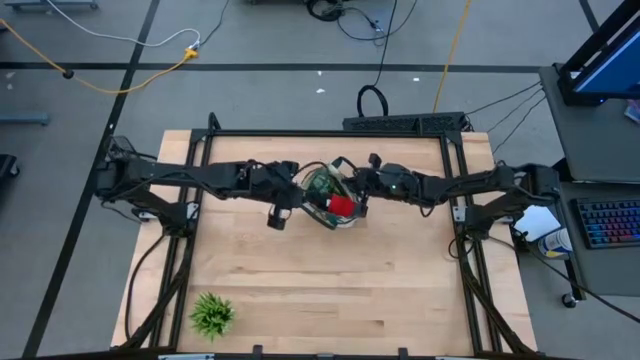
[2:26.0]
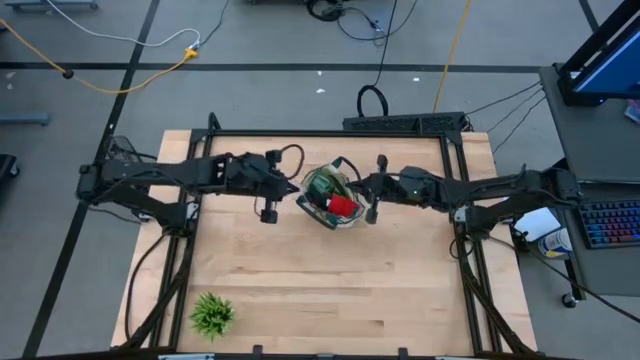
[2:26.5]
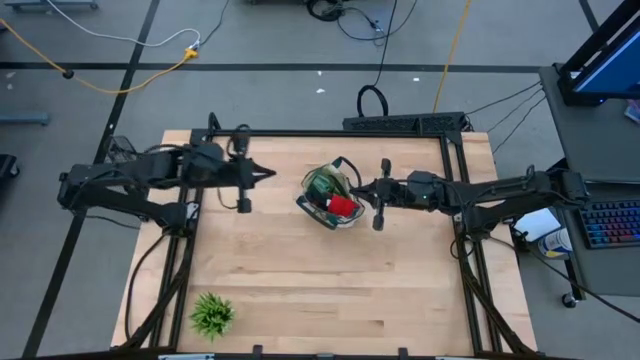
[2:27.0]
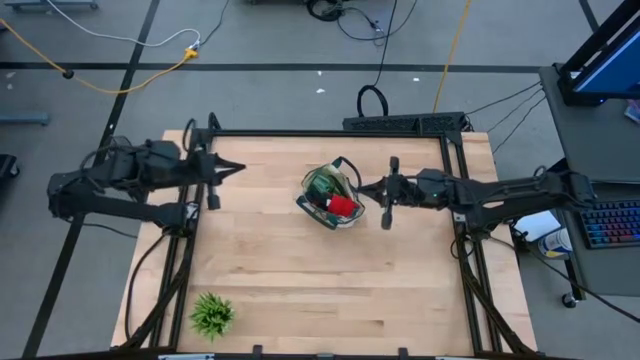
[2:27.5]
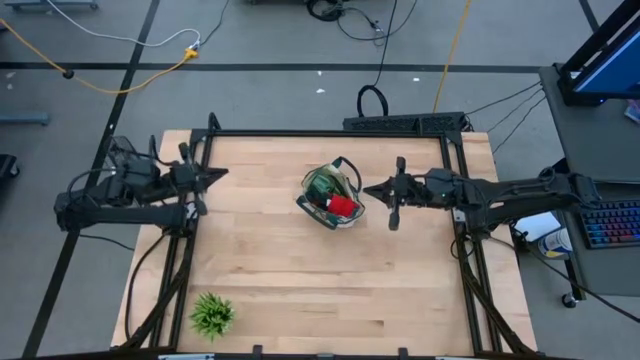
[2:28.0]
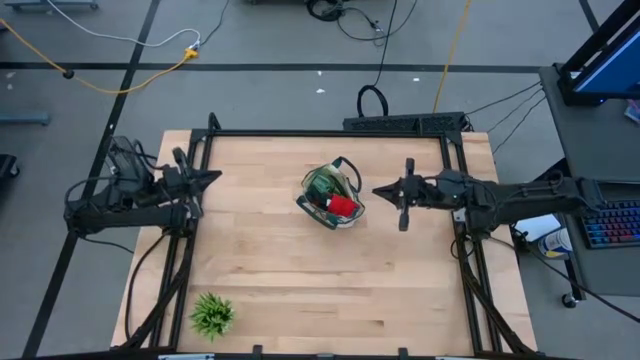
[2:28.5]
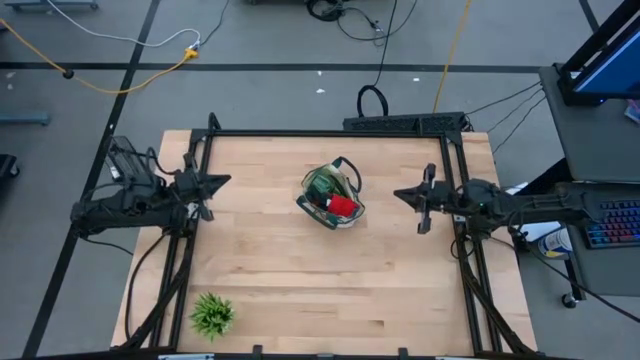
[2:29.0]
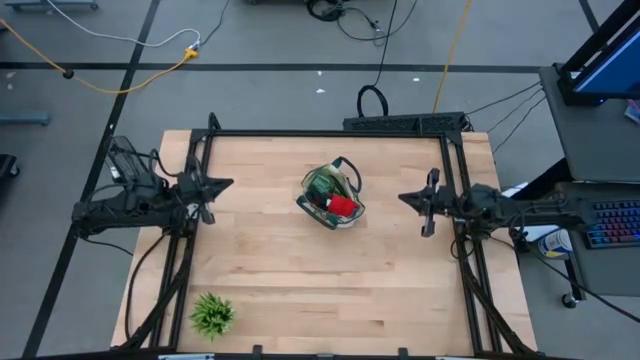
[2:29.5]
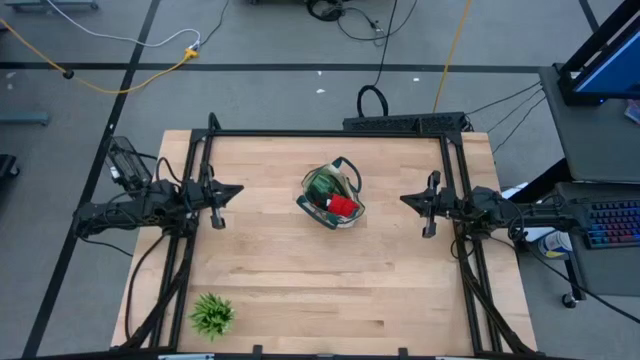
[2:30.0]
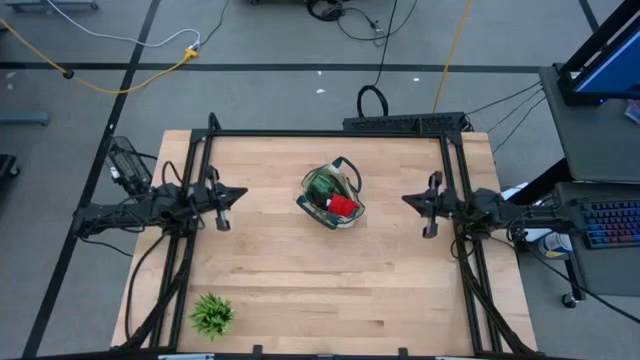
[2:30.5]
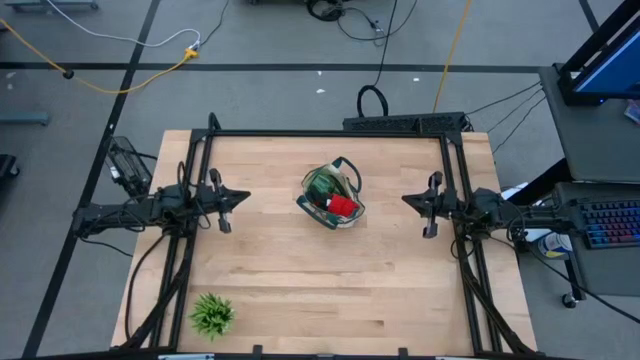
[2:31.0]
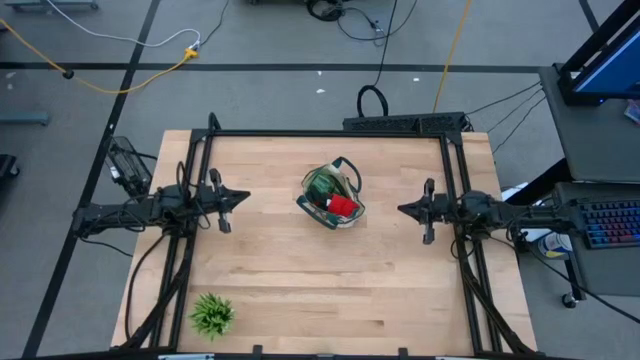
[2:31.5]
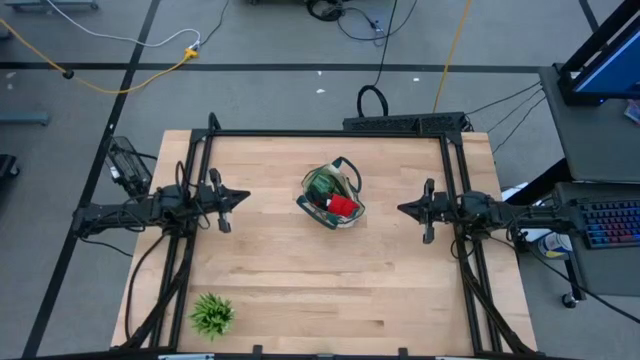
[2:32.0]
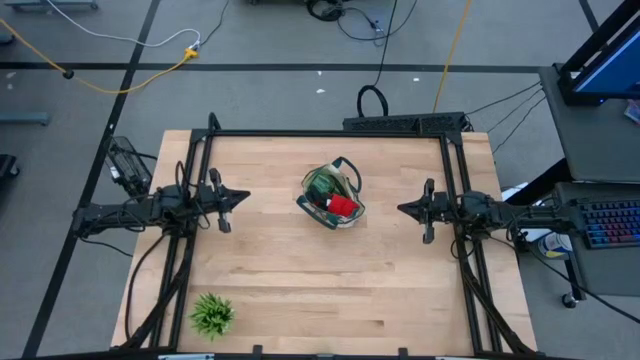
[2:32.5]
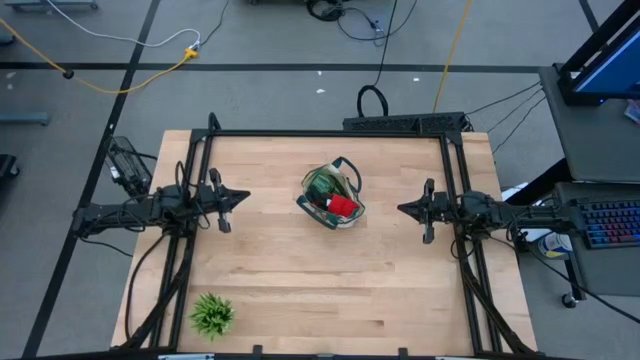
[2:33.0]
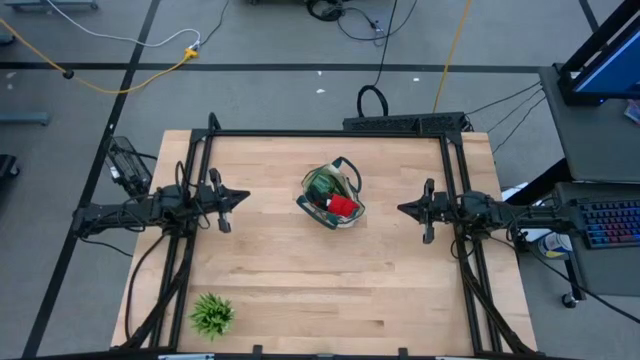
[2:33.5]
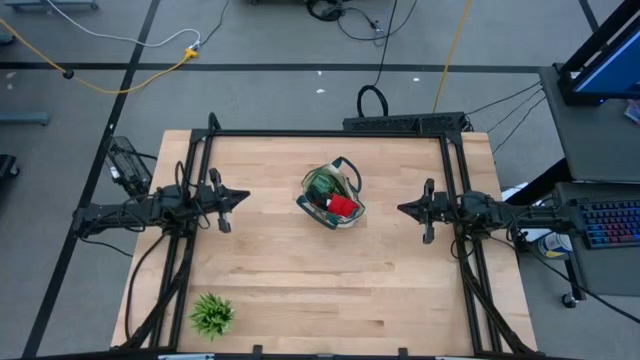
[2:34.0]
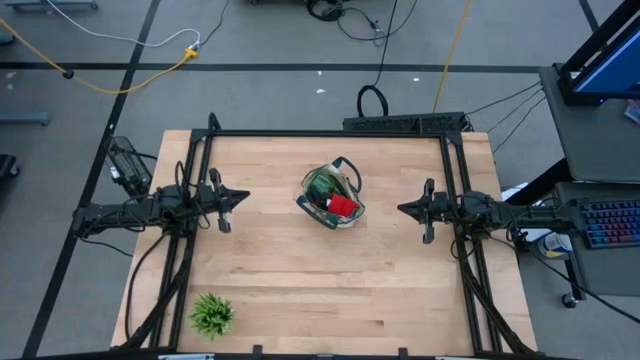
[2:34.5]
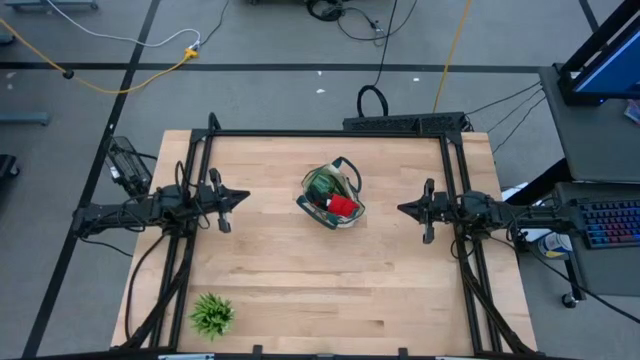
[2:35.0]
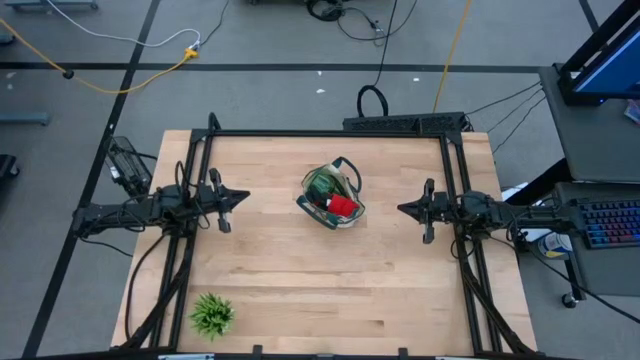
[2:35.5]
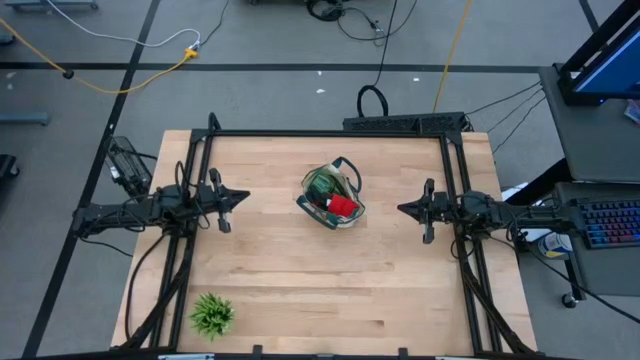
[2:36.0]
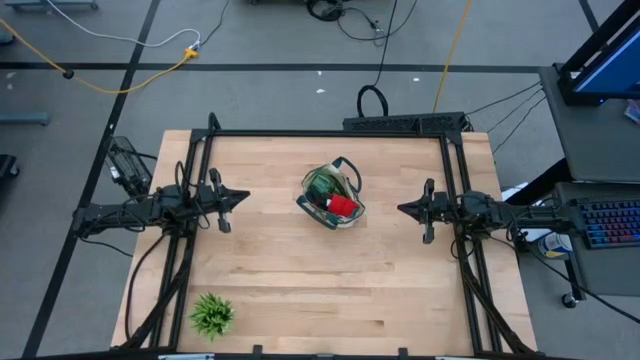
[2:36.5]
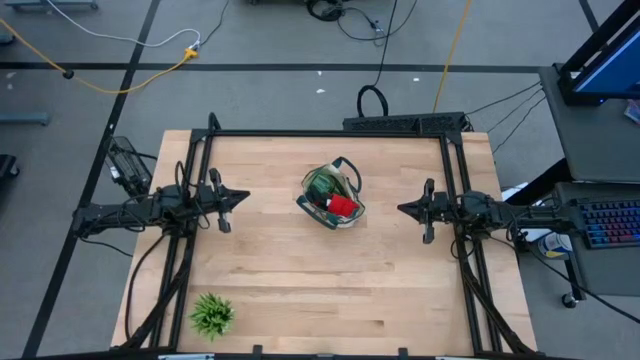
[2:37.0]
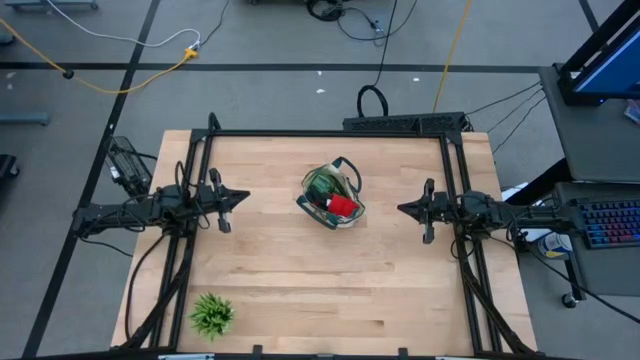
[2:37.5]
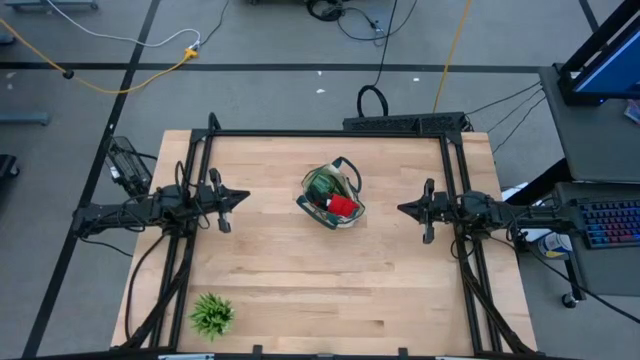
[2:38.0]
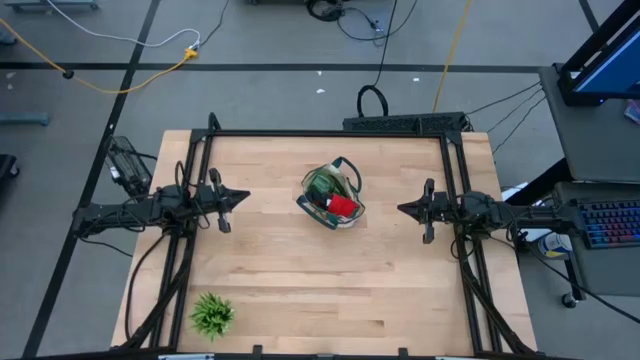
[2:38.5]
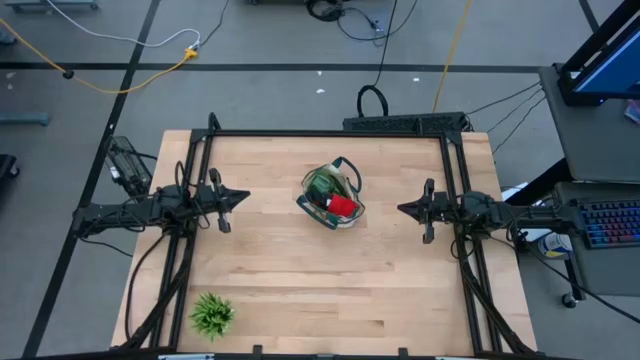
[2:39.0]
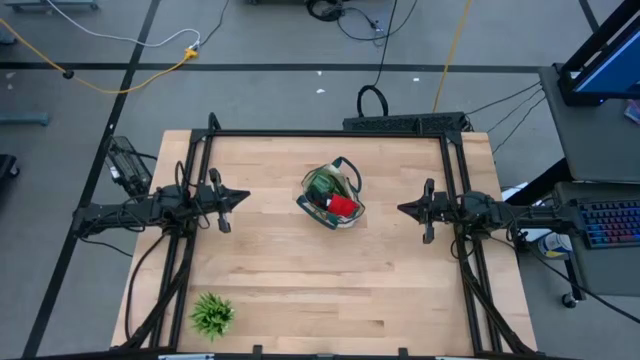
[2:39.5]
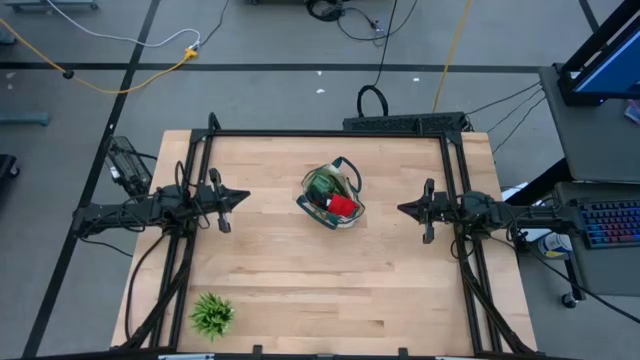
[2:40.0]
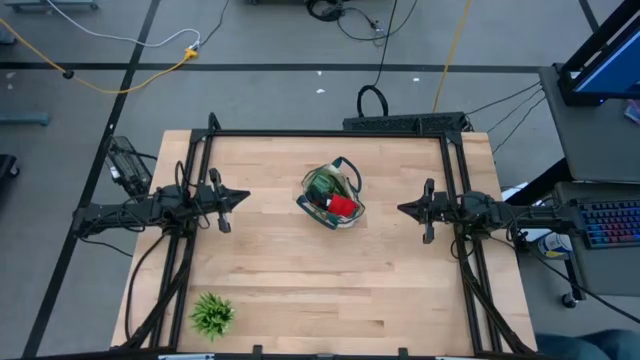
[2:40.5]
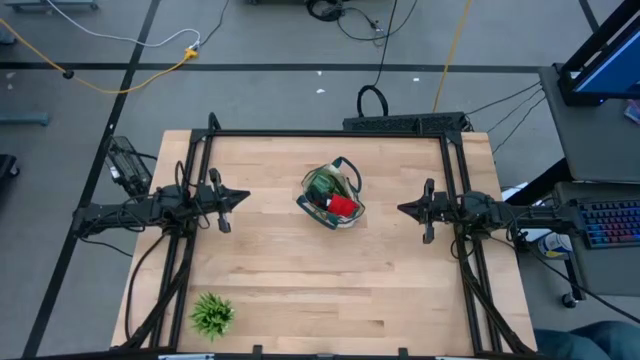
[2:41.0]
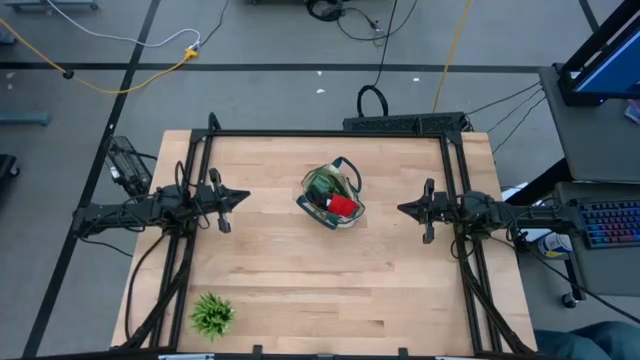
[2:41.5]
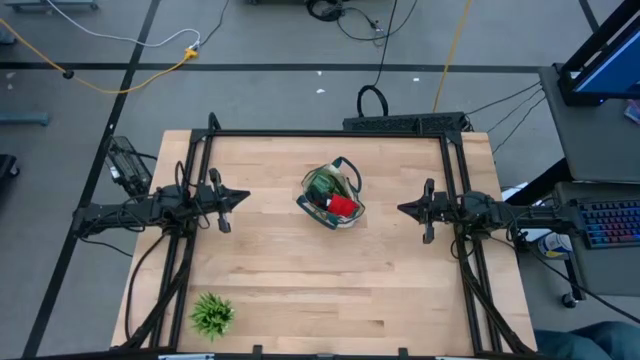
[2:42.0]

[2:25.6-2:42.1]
Task: Pick & Place Garden tools in Gardening bag
Return to Home Position

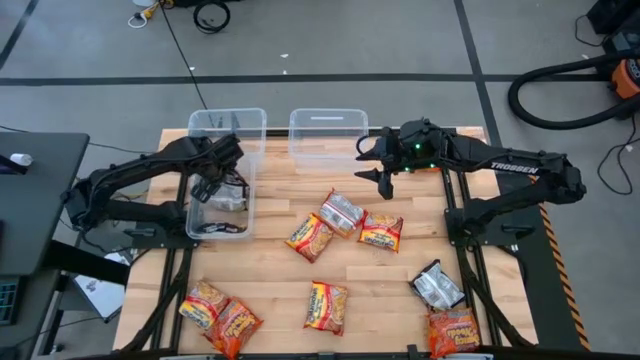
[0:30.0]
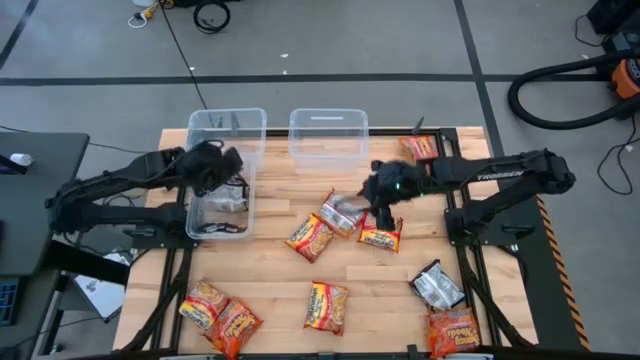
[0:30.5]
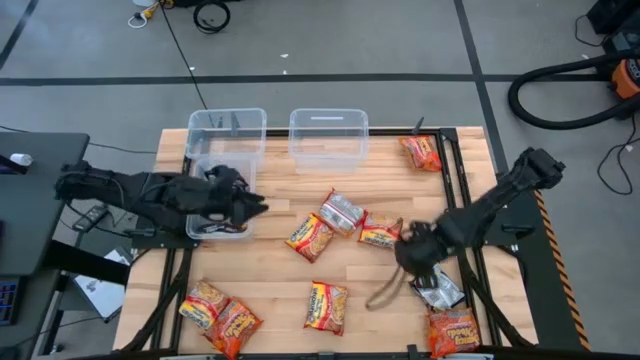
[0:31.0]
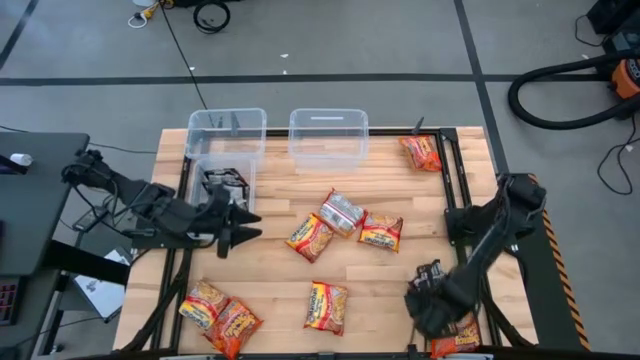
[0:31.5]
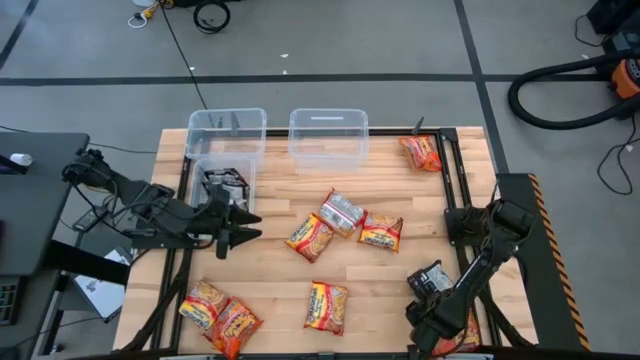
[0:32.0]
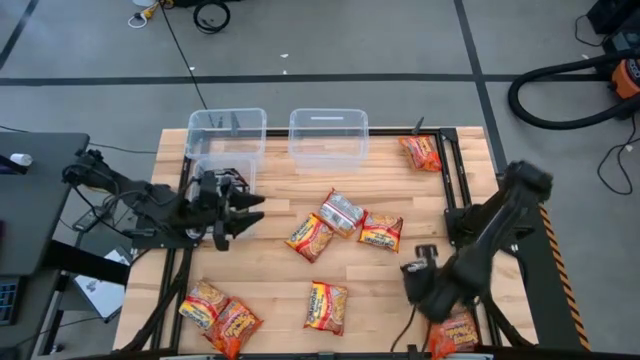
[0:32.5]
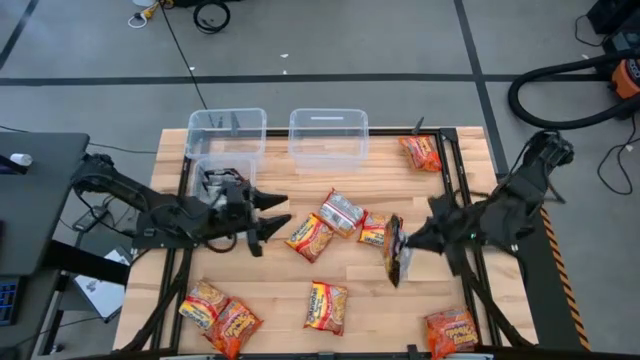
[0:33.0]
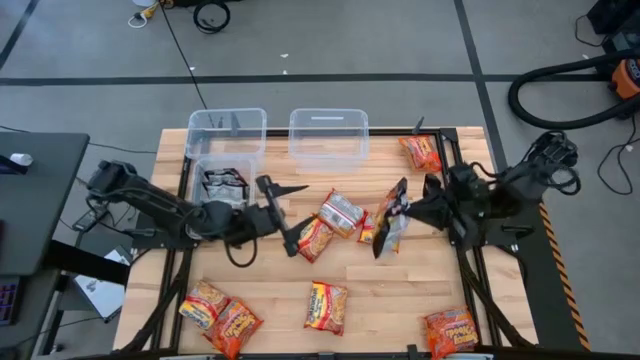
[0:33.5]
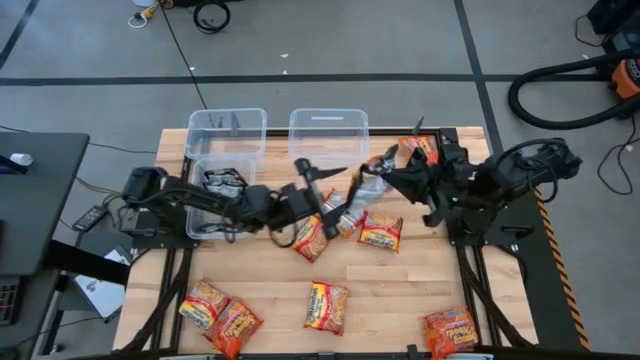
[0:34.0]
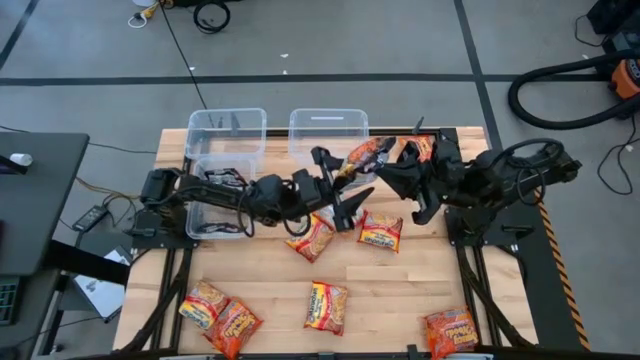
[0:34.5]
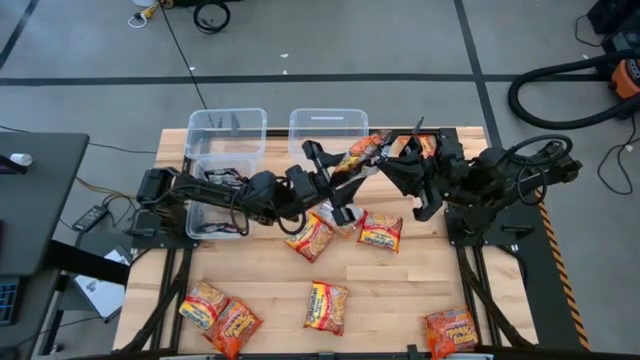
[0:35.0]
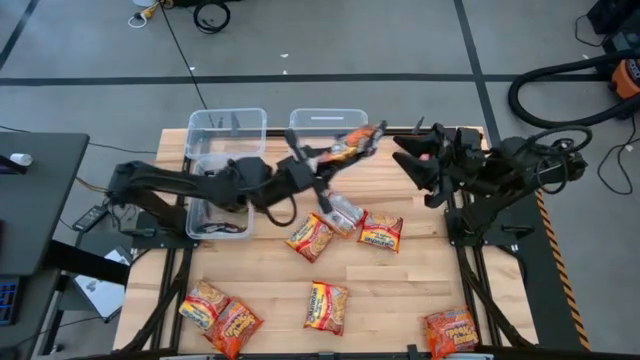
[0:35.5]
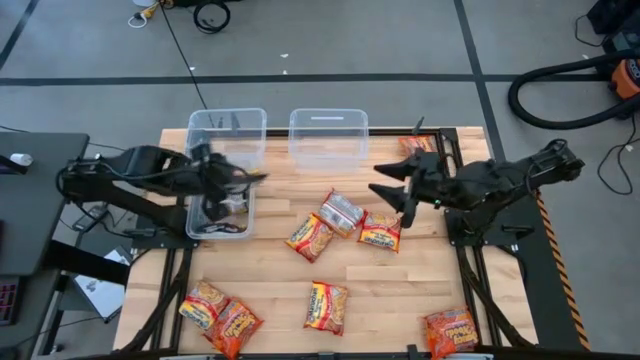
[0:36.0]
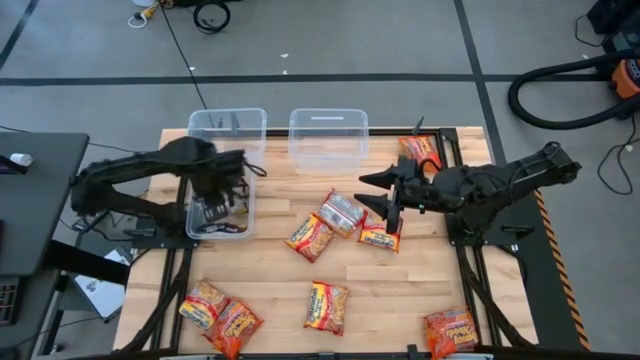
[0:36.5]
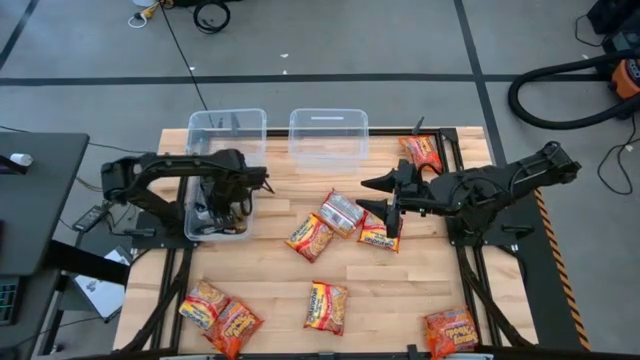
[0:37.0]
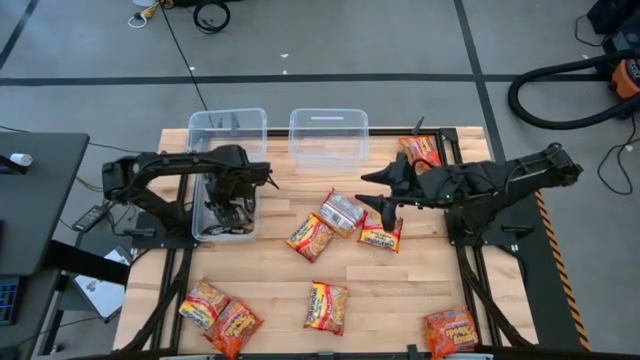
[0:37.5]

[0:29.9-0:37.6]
Task: Sort Maruchan noodles
Put the black noodle pack into the bottom transparent bin
